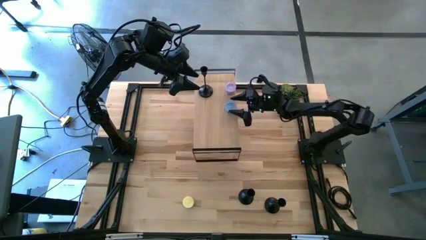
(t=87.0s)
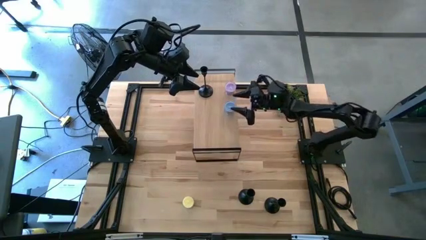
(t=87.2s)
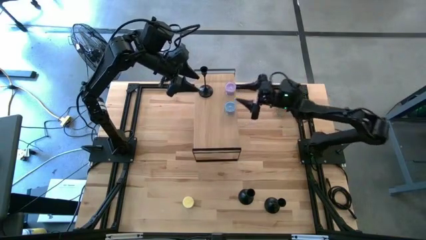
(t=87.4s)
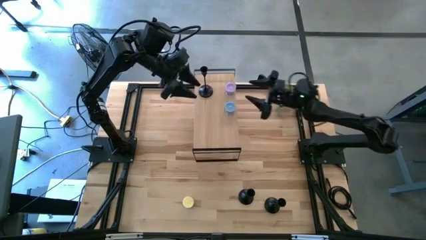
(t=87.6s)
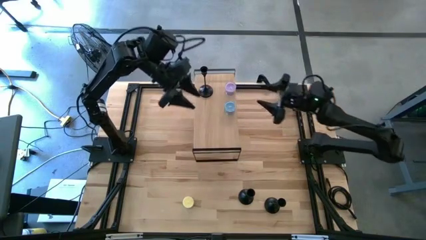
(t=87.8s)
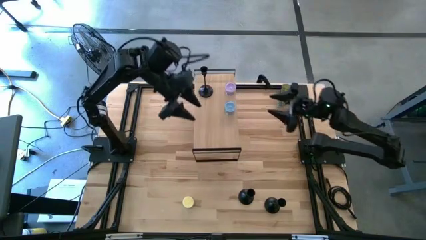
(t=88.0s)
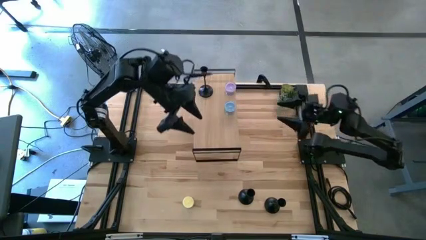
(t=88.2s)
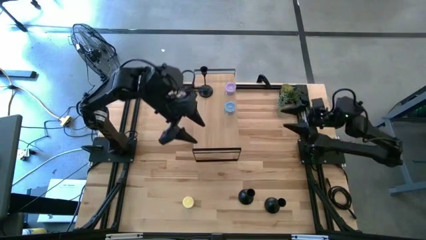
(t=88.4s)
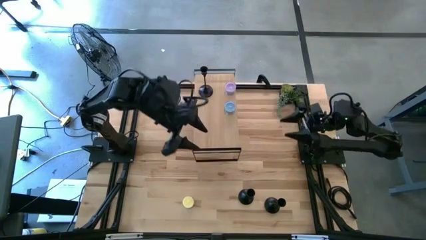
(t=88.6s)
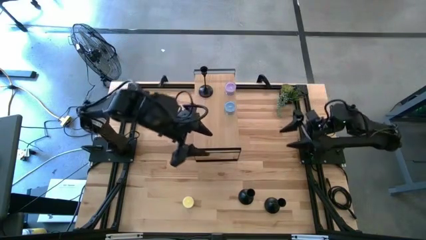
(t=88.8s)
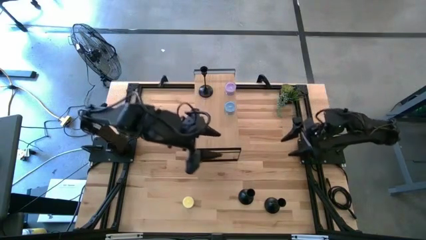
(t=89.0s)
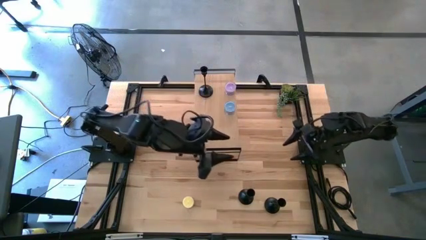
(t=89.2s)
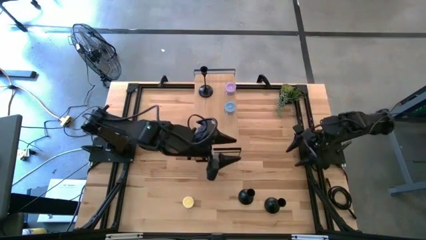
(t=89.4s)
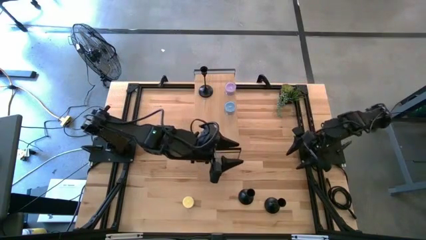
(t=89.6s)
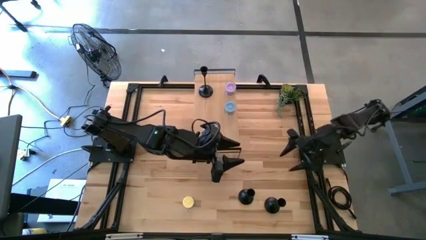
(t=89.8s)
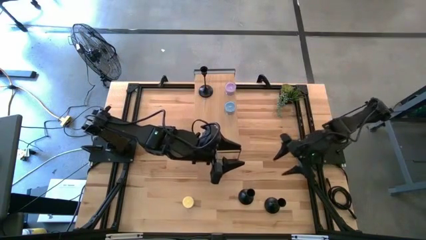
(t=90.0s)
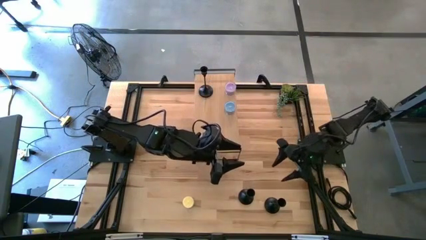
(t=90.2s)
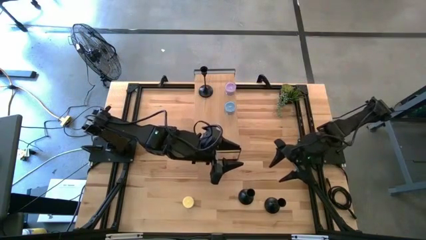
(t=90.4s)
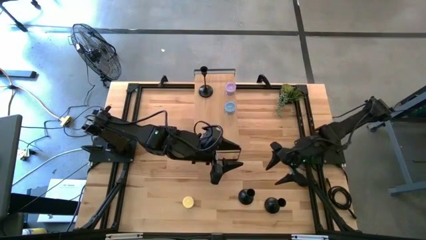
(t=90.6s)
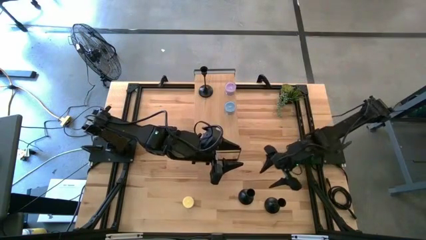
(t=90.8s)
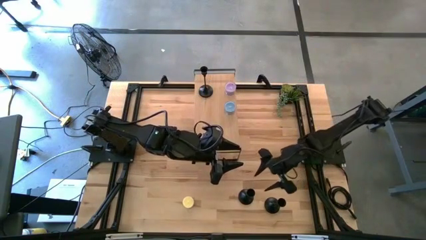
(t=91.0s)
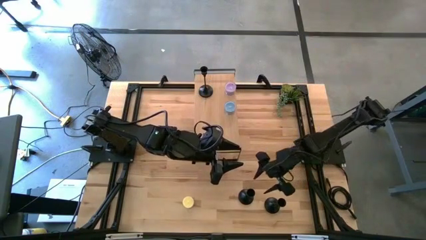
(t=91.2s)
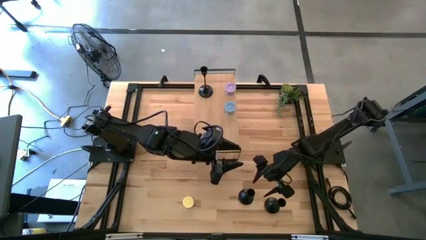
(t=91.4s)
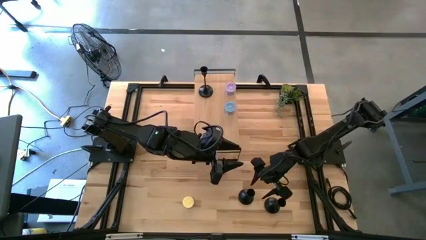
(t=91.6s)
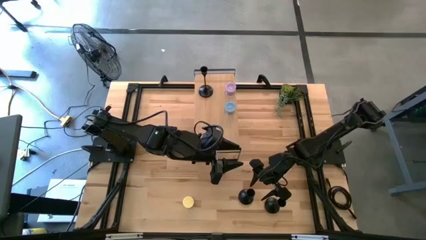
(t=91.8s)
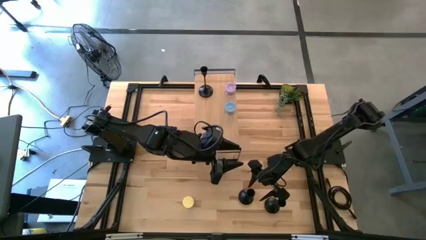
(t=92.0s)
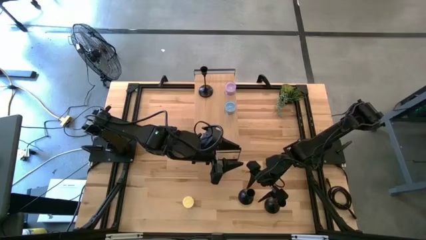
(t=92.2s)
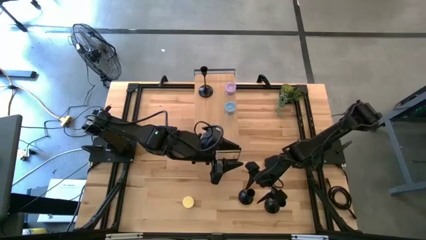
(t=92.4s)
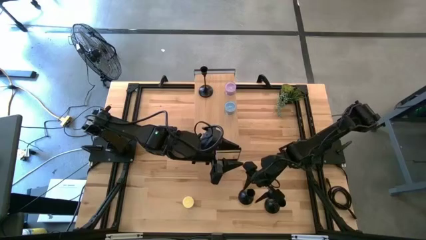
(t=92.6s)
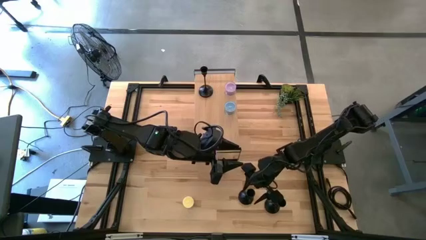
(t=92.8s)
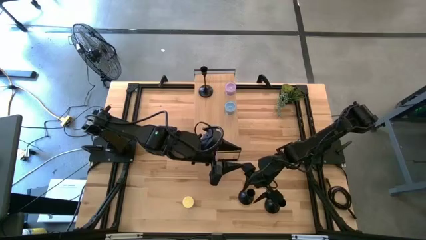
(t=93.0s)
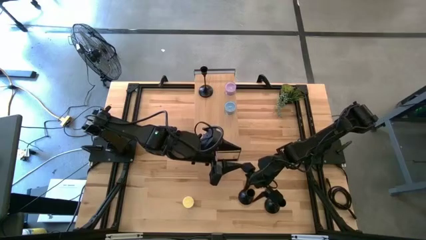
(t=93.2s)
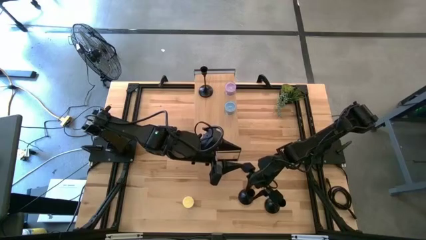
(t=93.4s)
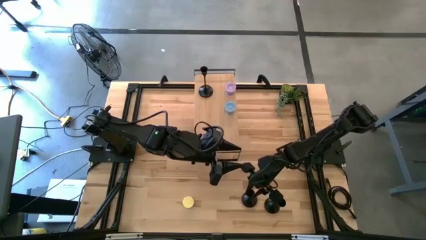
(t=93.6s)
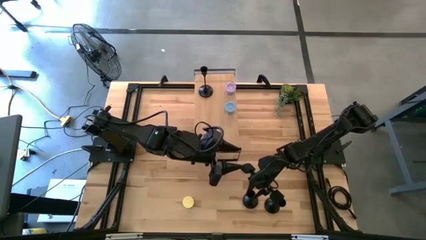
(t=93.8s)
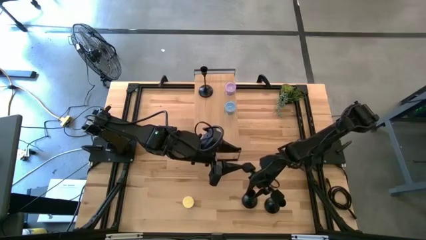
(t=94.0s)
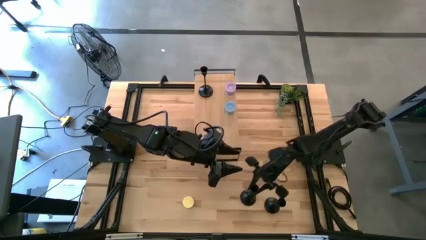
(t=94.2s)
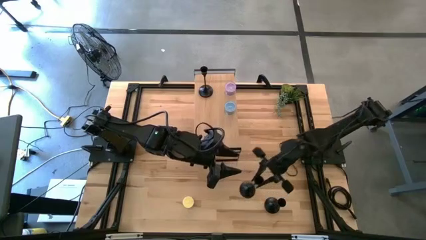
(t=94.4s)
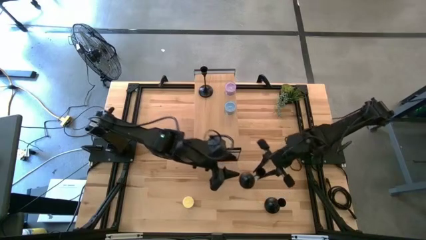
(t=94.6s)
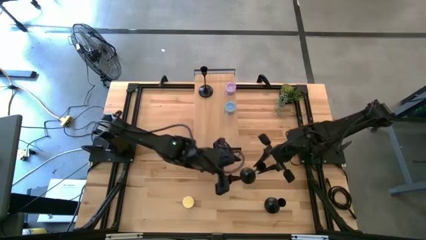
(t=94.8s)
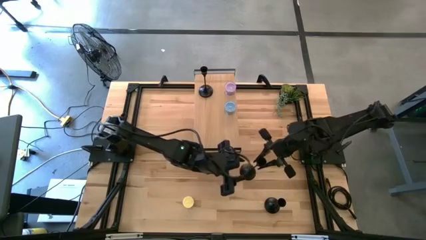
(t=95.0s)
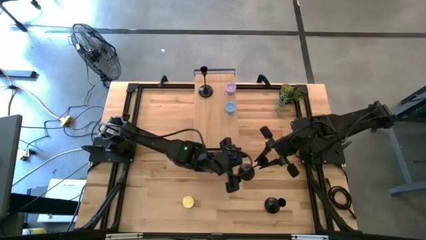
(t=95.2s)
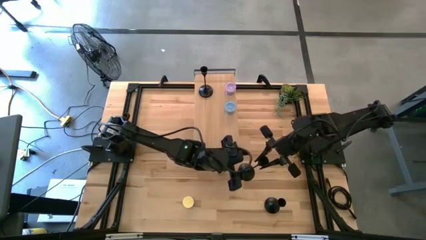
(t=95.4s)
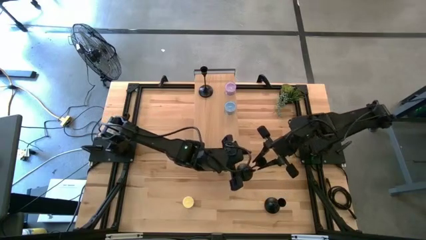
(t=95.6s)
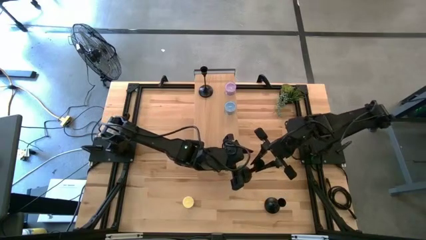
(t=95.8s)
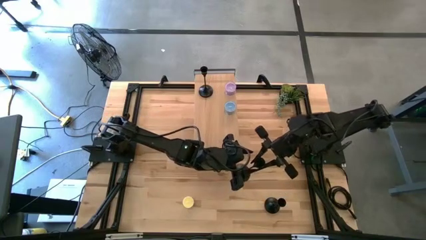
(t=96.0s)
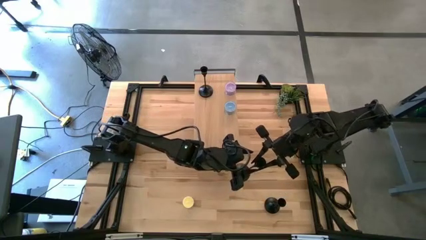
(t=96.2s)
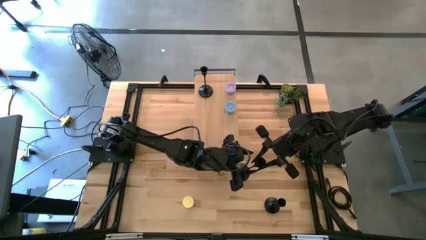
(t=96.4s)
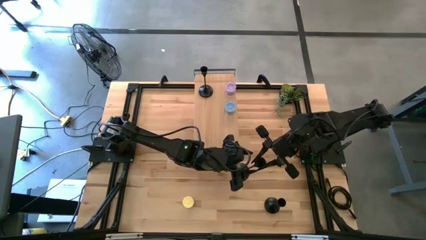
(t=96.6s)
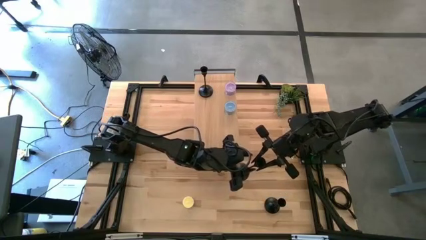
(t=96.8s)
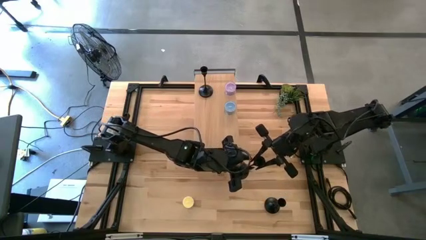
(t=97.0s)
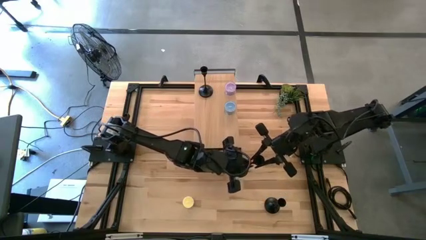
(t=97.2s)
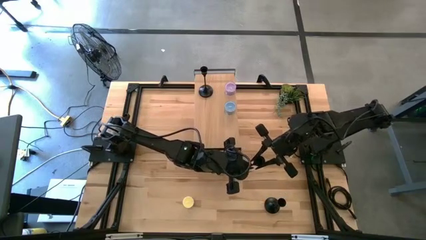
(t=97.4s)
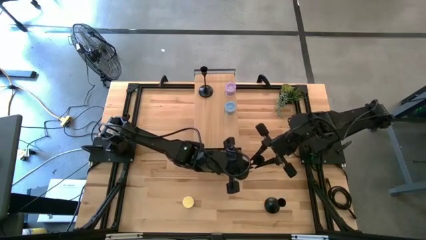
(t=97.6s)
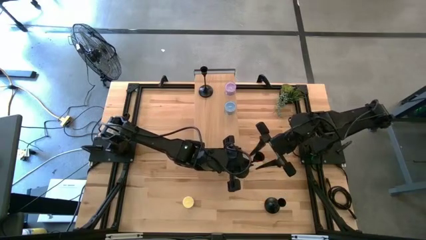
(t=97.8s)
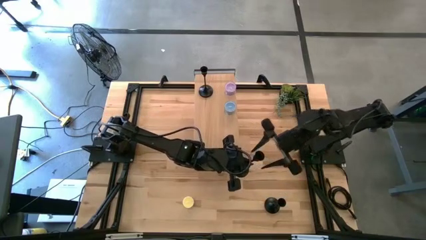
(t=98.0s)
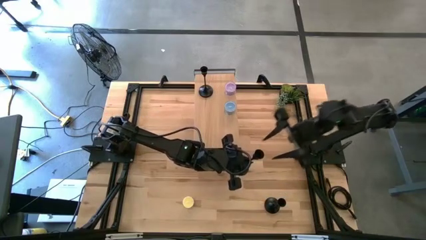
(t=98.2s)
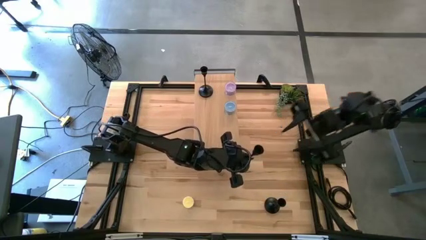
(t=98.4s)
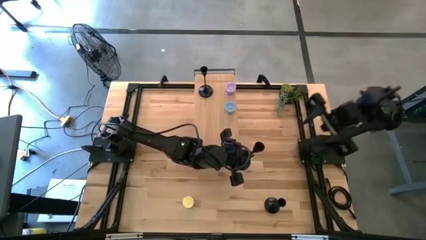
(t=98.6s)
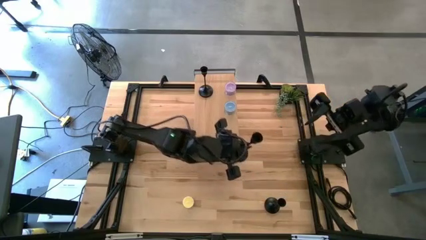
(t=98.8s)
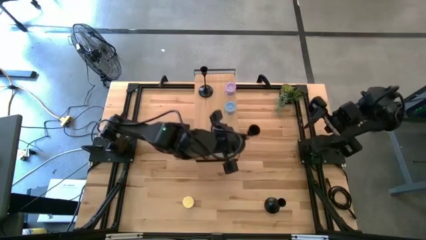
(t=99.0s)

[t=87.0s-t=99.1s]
Task: Pick & Place candle stick holders
Put the left black candle holder on the shelf

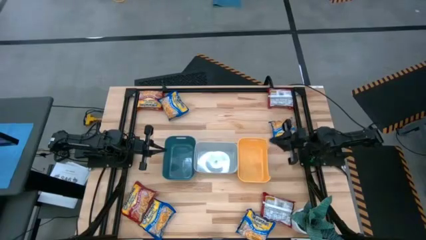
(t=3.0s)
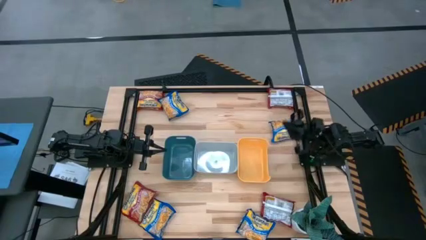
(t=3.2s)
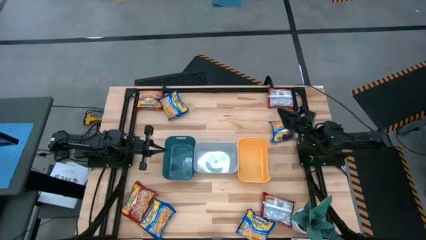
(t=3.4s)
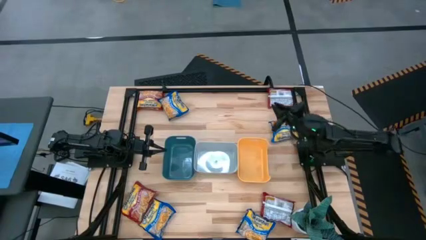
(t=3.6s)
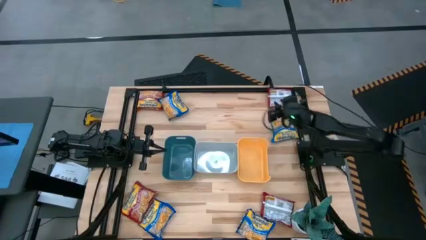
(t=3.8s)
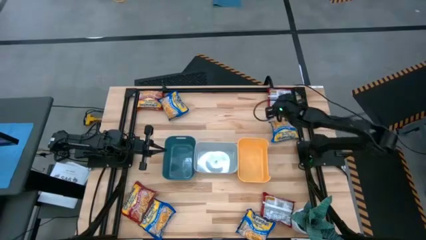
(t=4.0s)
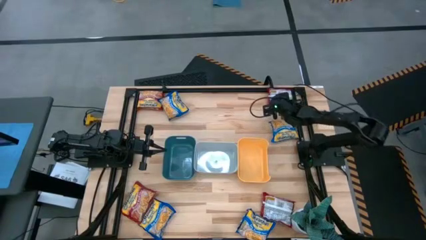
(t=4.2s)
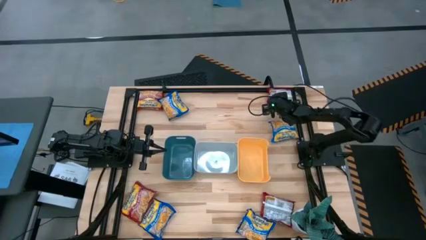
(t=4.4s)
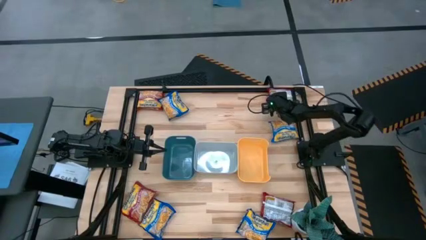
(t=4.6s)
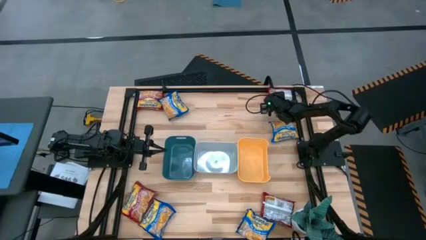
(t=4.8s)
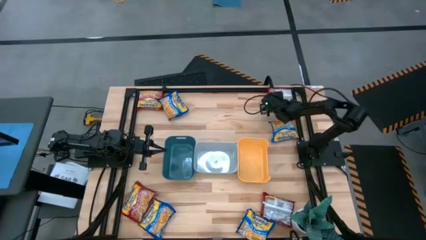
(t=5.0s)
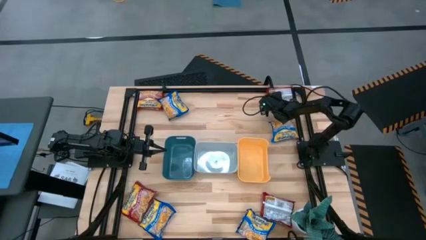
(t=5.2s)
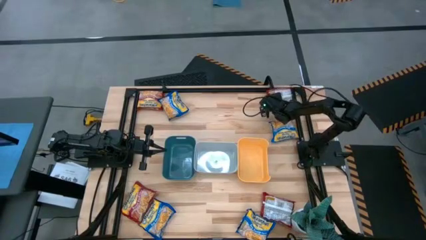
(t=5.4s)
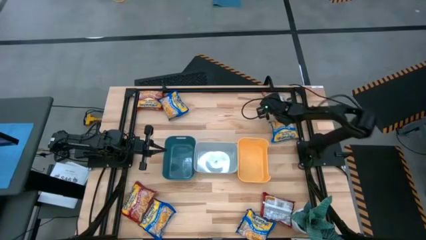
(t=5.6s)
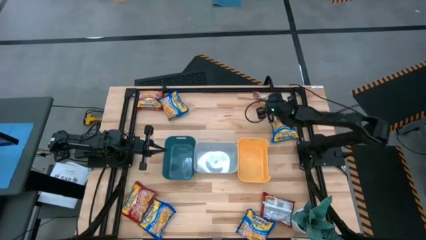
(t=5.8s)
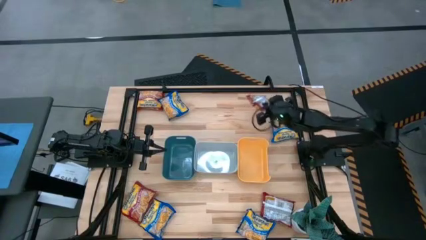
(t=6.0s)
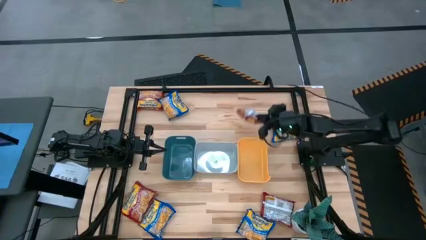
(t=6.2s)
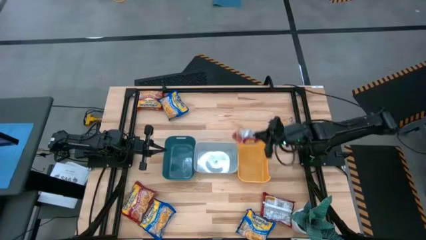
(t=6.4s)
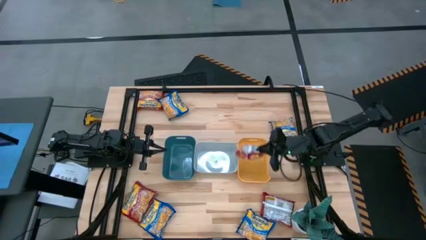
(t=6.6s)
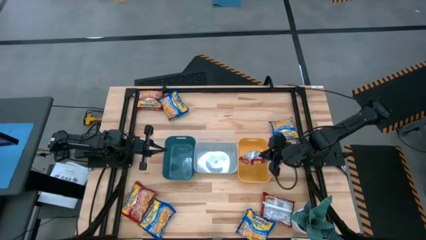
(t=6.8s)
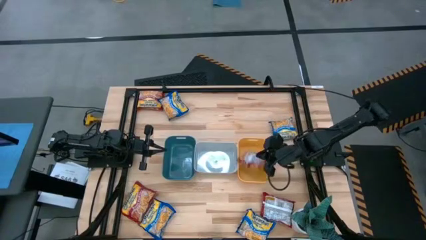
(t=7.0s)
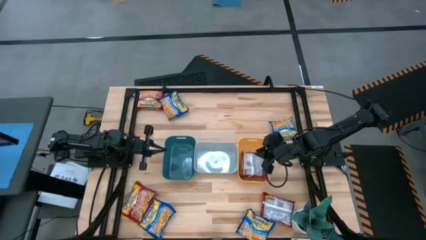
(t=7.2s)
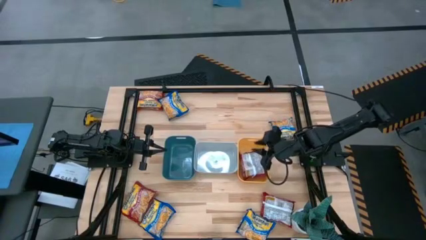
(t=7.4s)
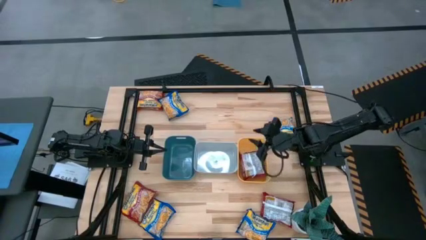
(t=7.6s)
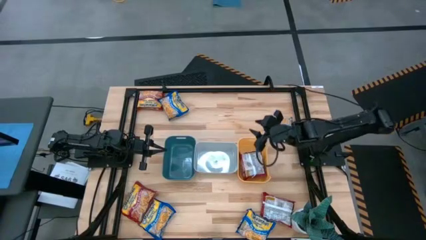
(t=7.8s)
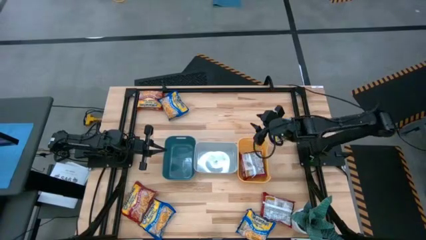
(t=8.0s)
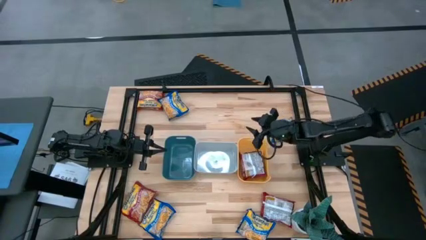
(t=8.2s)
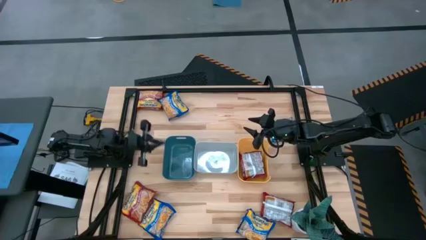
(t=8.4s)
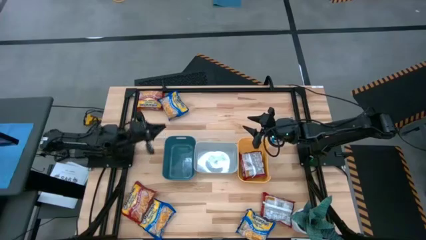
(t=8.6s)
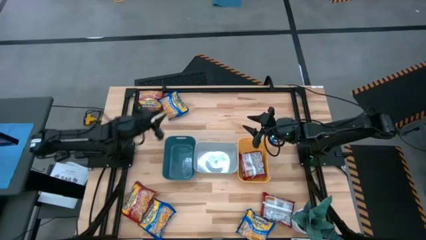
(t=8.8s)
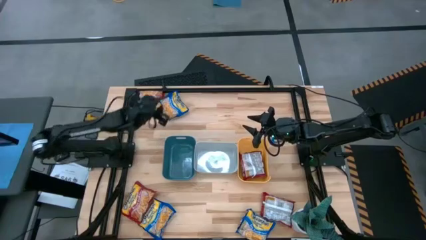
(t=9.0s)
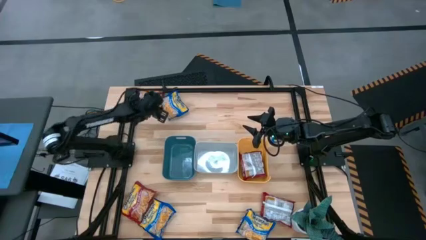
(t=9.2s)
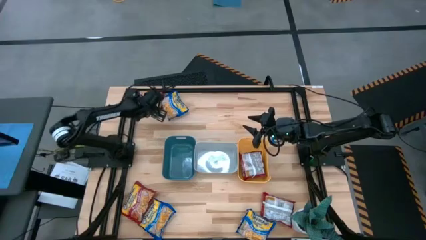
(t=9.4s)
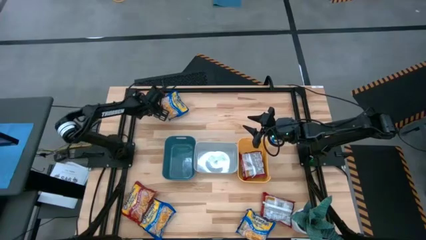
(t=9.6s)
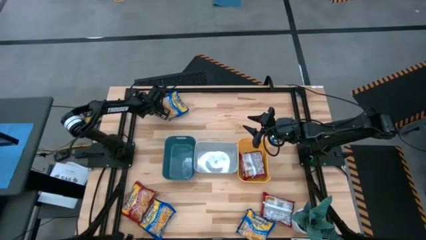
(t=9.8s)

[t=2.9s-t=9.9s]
Task: Sort Maruchan noodles
Put the top right red noodle pack into the yellow bin
